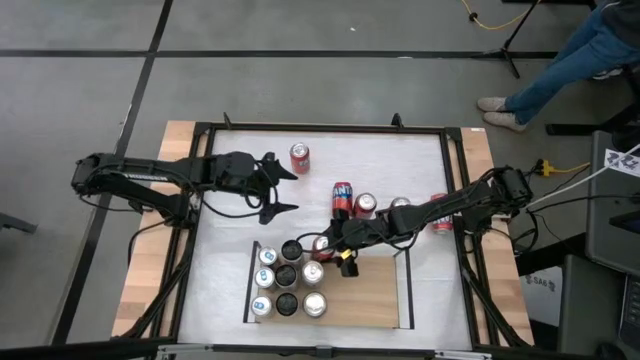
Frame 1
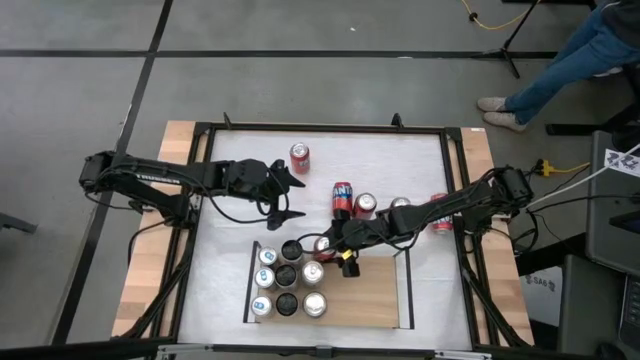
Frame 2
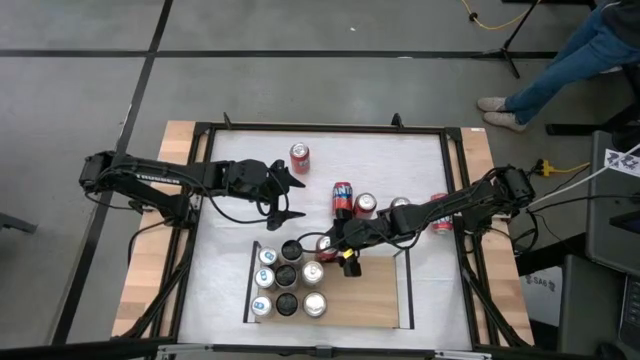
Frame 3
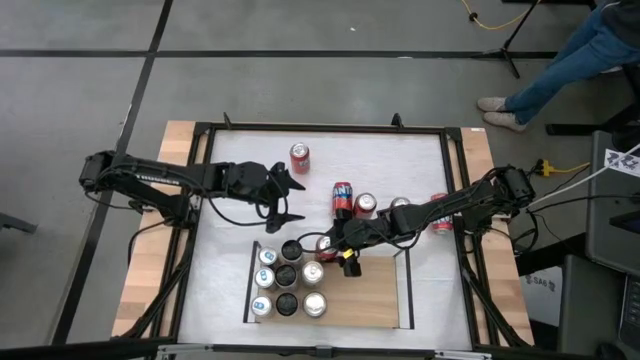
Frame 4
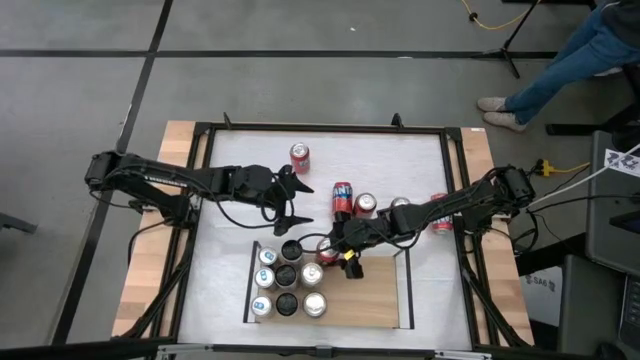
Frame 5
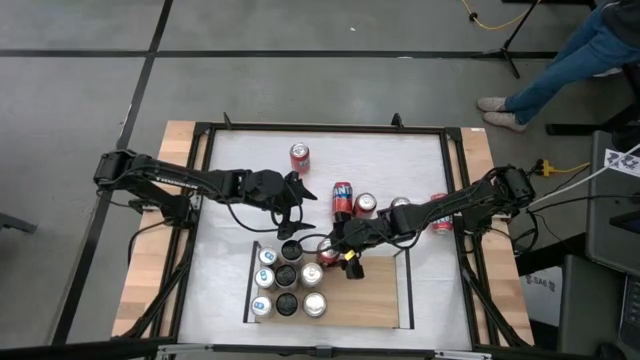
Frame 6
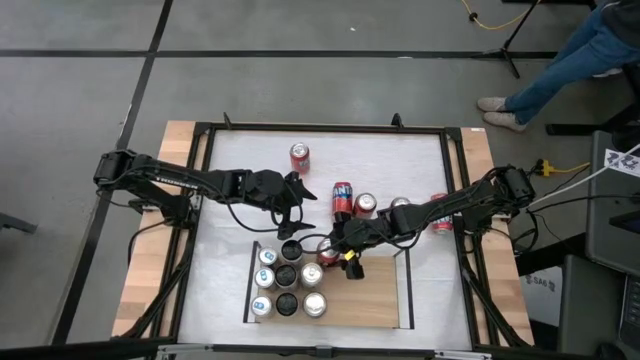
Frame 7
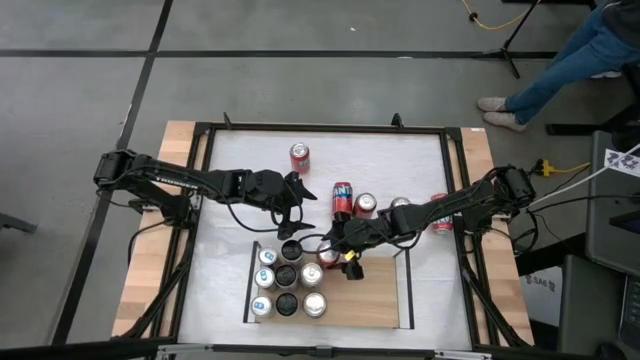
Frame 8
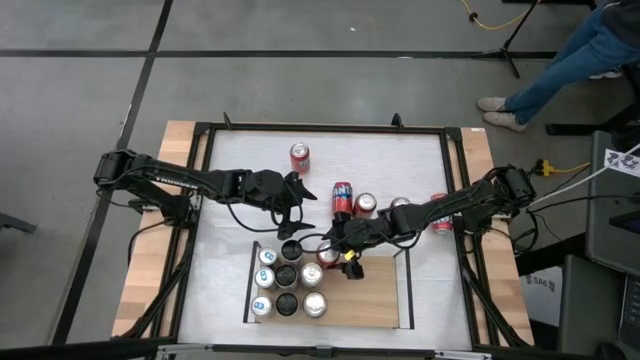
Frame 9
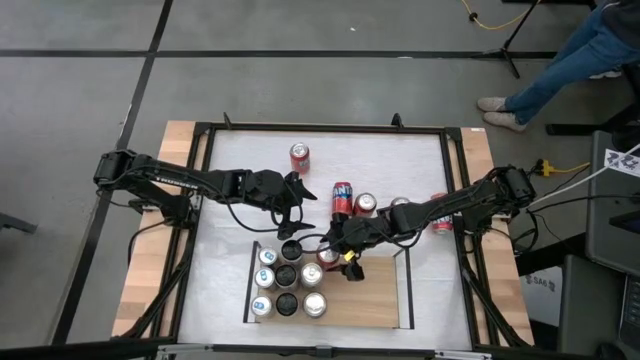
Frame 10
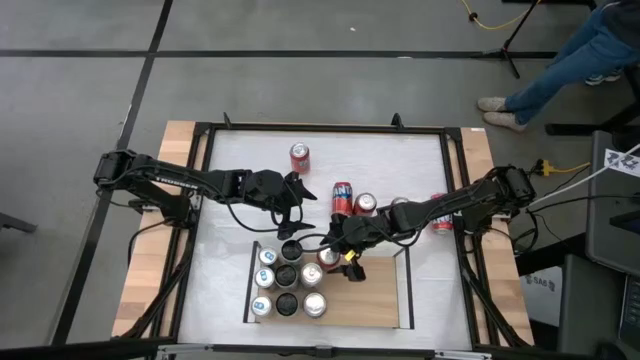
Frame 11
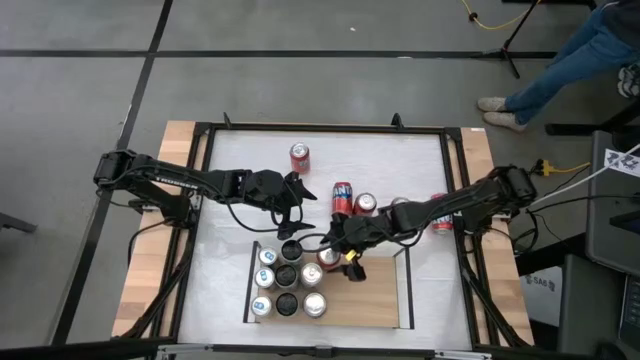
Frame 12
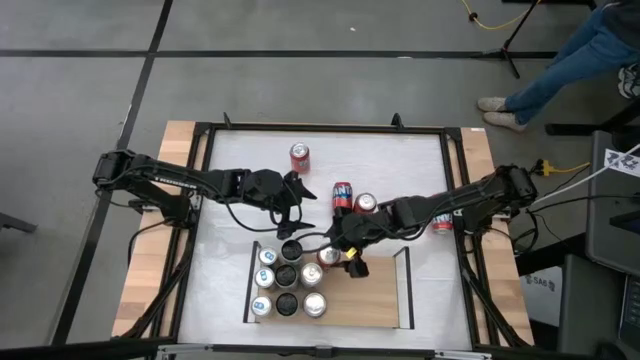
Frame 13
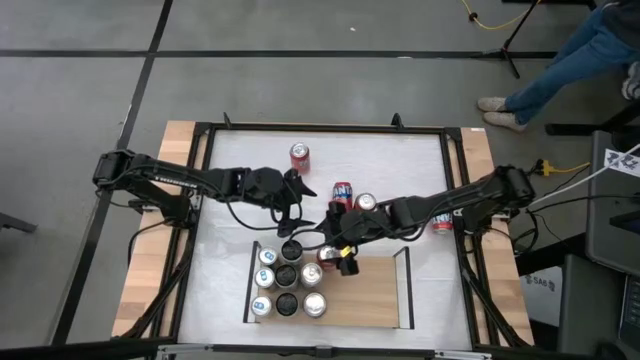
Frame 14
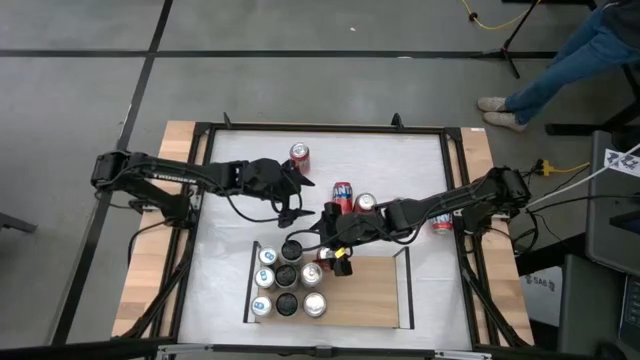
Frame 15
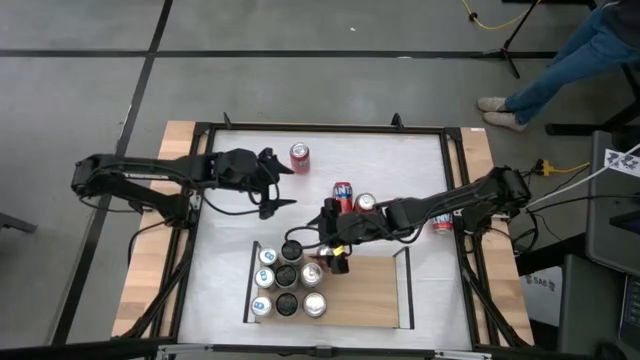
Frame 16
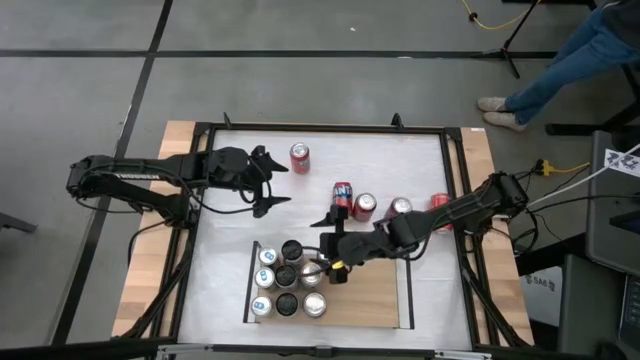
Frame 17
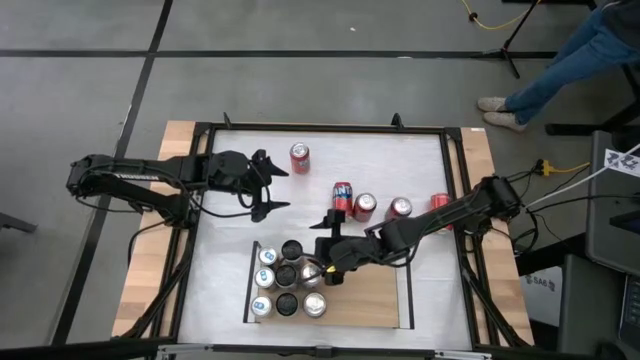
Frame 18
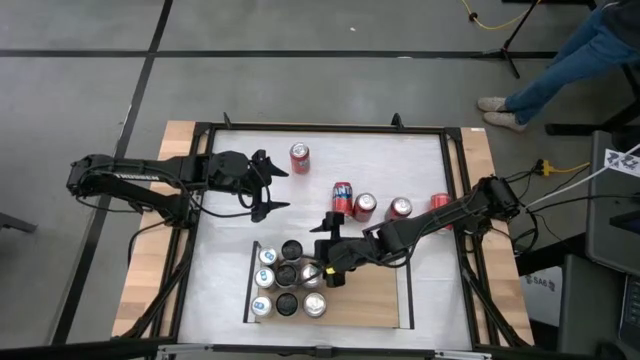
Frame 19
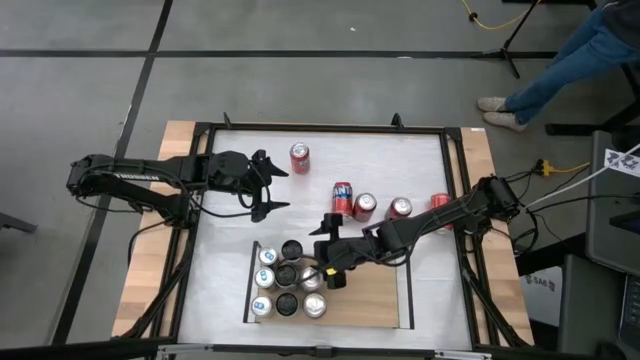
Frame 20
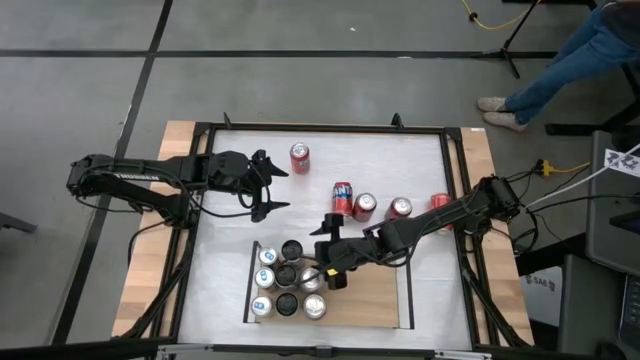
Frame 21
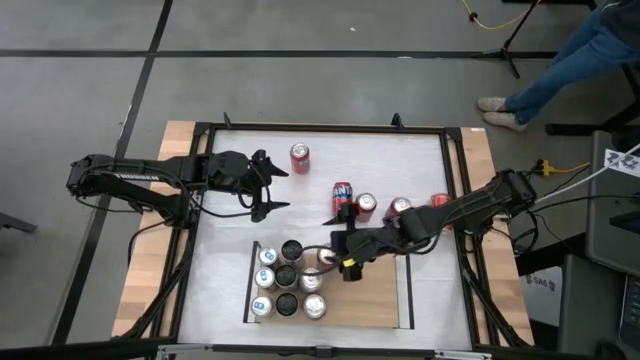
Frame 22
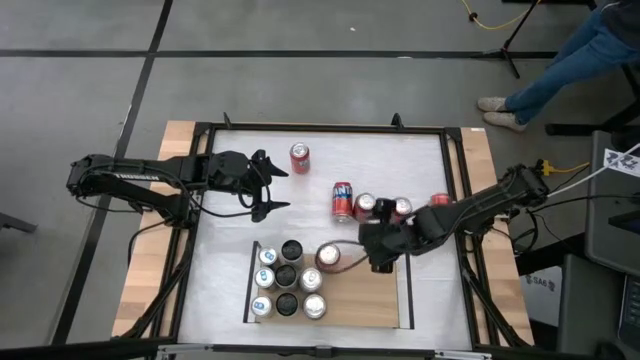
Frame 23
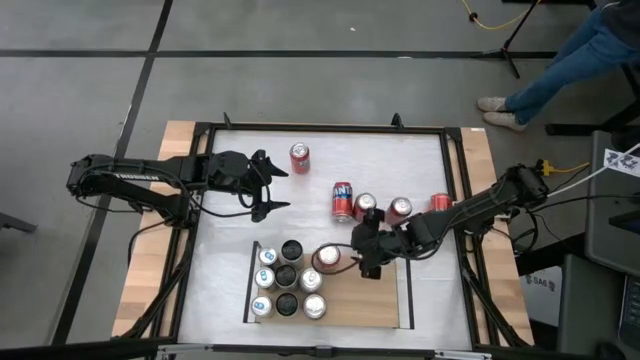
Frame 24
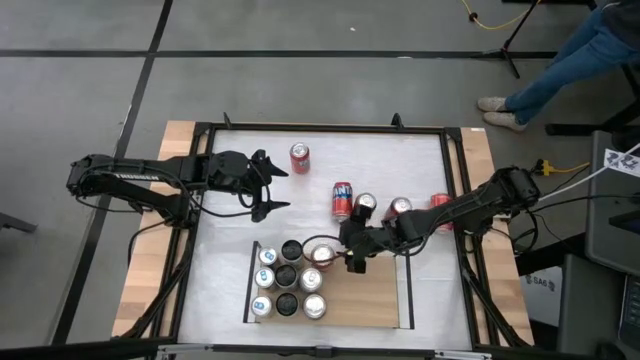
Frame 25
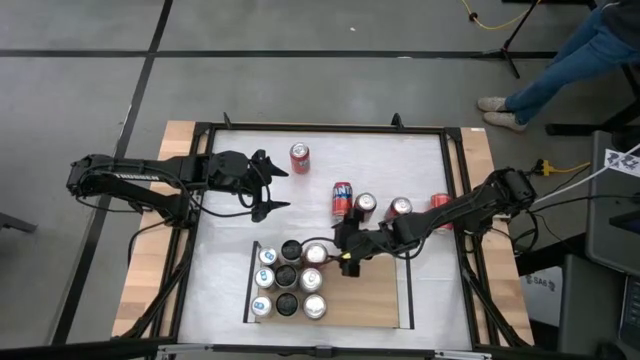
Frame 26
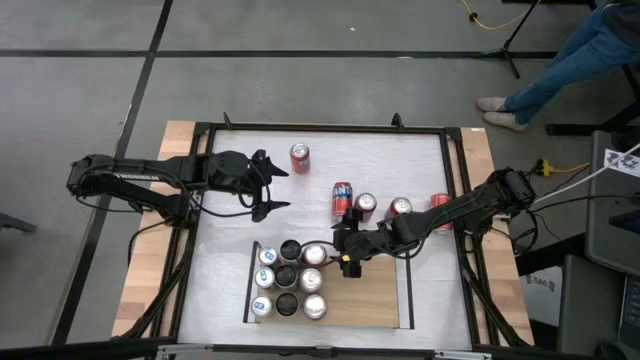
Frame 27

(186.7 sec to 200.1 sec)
Task: Place canned beverage on shelf
Put the red soda can on the shelf aligned with the silver soda can
